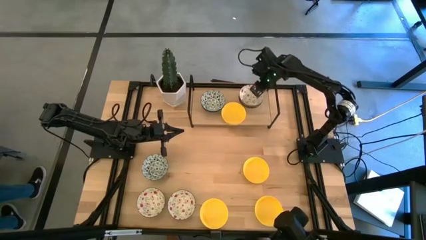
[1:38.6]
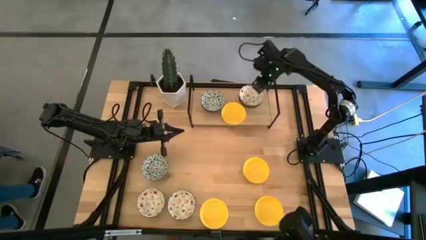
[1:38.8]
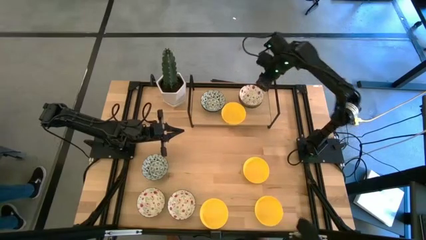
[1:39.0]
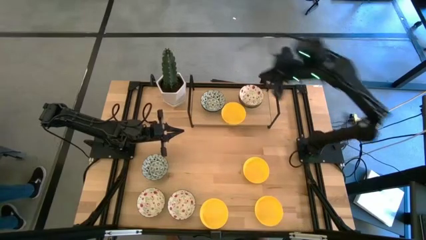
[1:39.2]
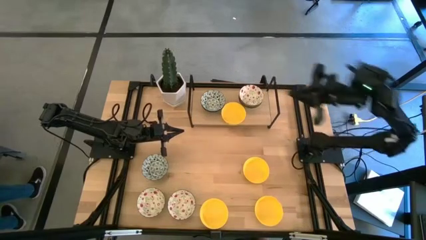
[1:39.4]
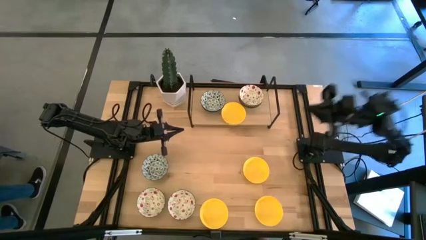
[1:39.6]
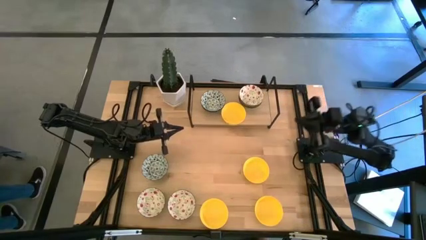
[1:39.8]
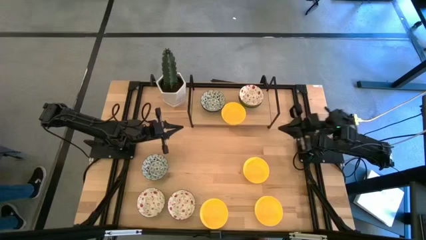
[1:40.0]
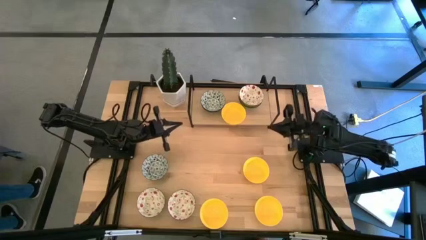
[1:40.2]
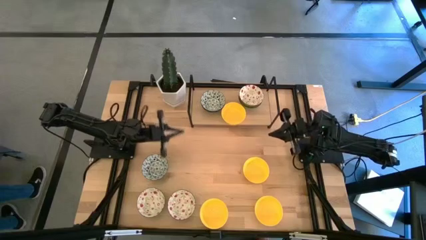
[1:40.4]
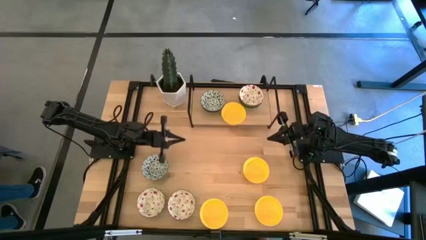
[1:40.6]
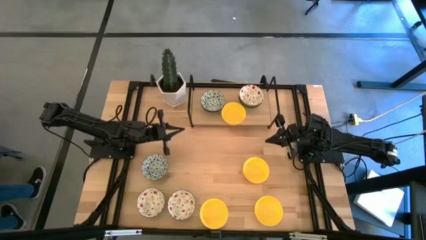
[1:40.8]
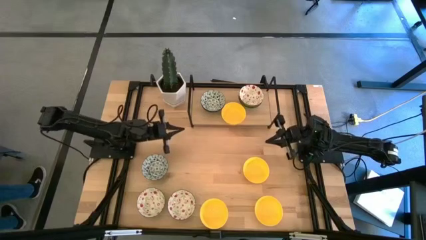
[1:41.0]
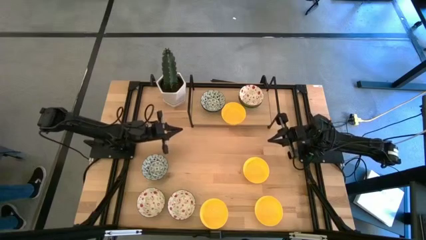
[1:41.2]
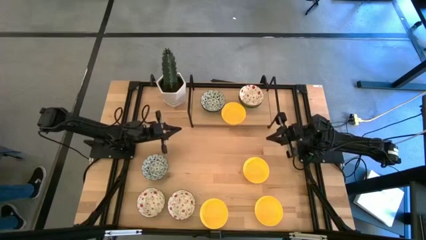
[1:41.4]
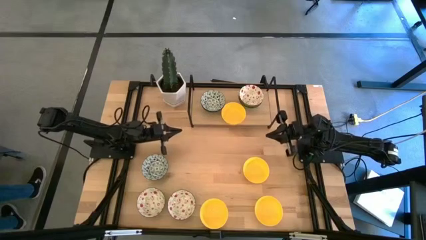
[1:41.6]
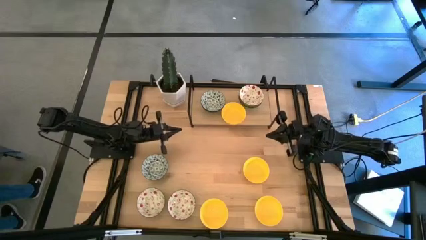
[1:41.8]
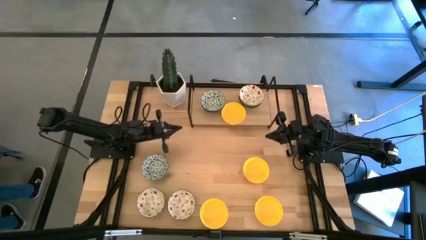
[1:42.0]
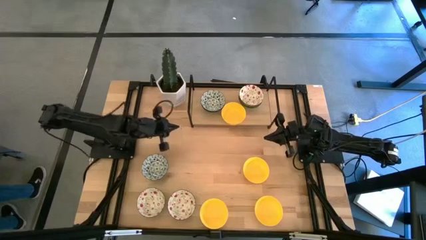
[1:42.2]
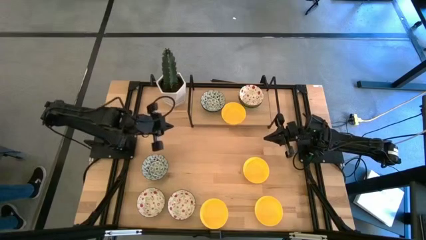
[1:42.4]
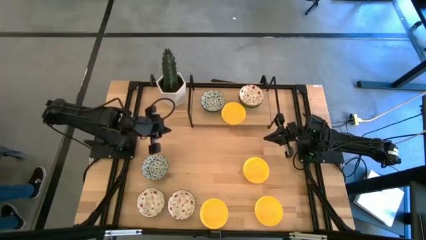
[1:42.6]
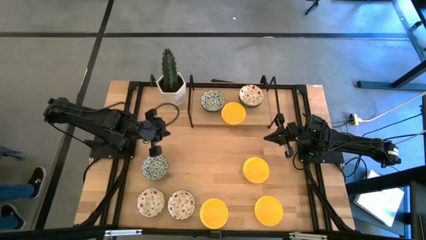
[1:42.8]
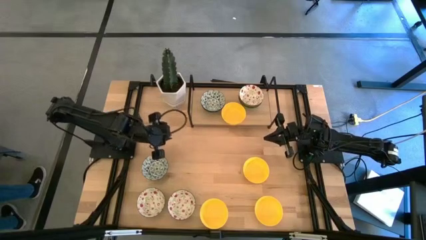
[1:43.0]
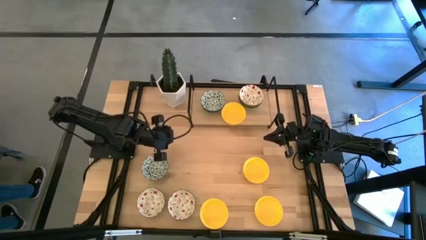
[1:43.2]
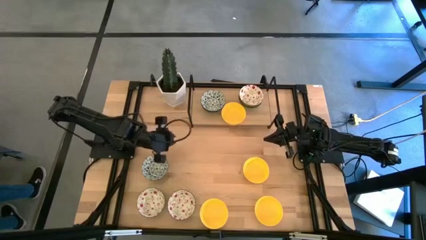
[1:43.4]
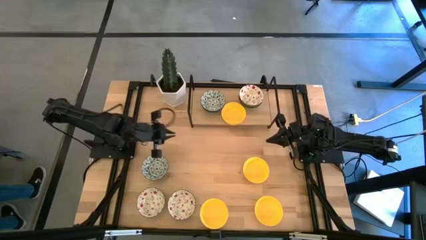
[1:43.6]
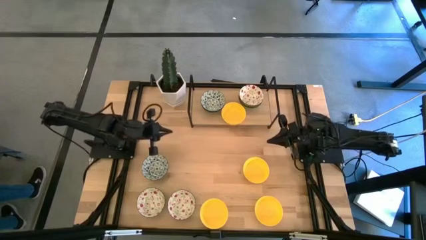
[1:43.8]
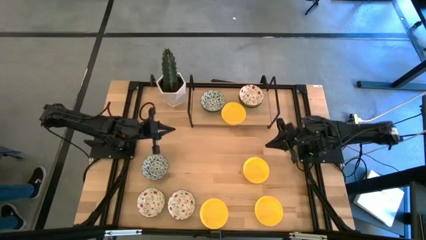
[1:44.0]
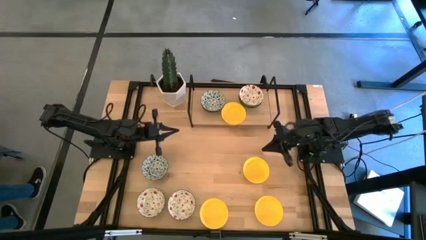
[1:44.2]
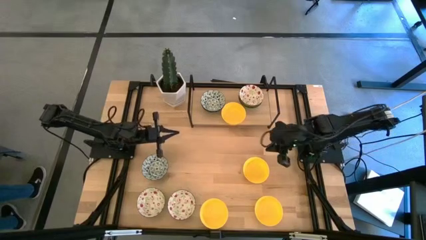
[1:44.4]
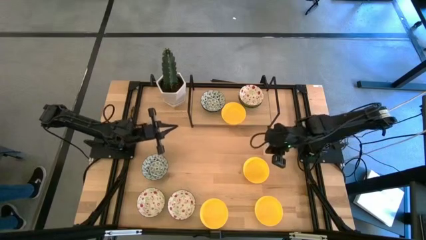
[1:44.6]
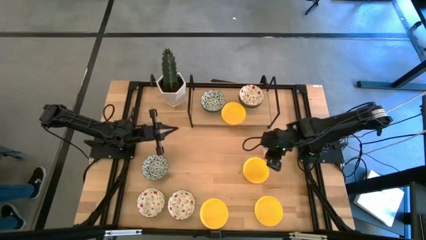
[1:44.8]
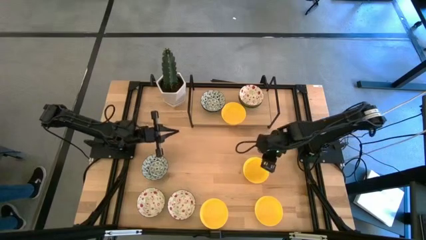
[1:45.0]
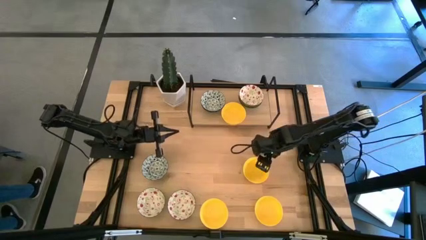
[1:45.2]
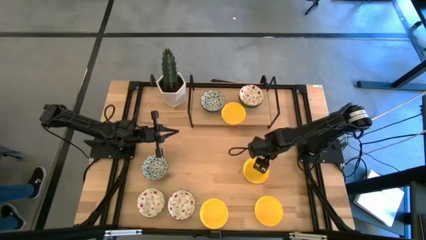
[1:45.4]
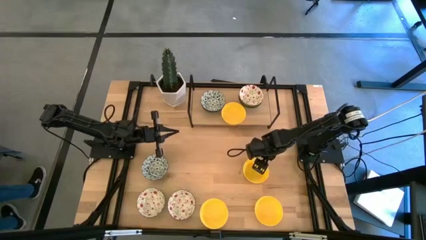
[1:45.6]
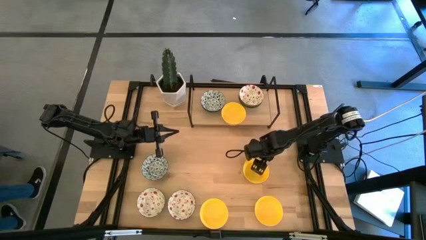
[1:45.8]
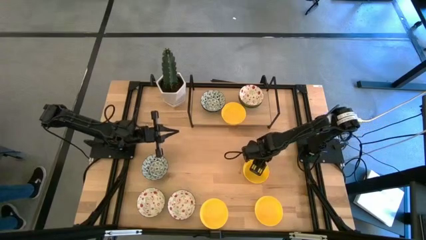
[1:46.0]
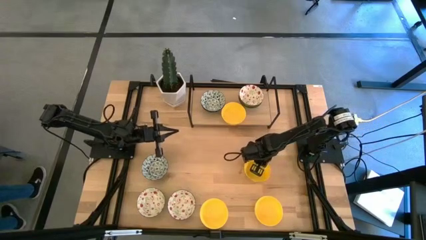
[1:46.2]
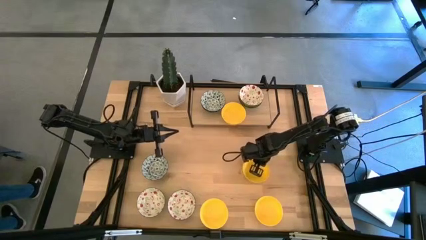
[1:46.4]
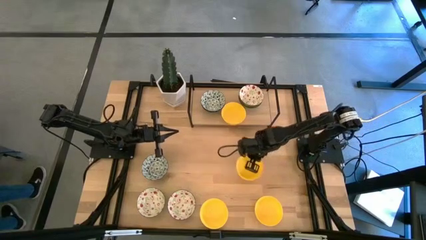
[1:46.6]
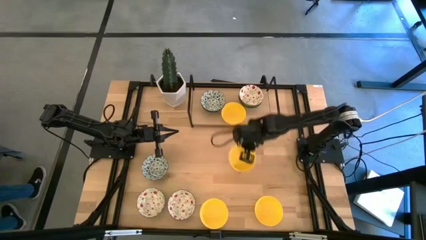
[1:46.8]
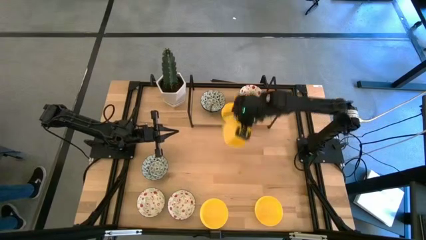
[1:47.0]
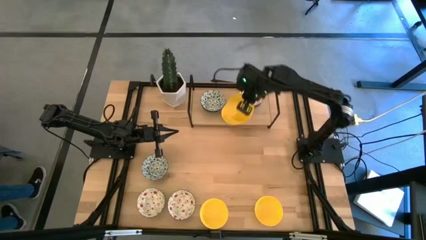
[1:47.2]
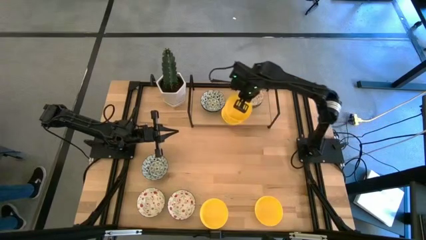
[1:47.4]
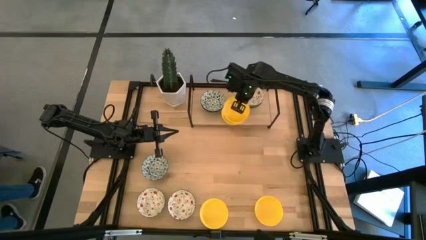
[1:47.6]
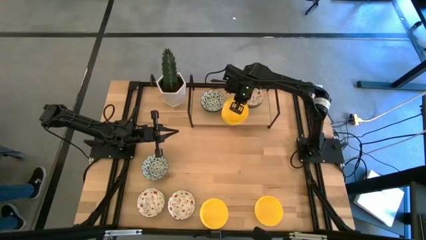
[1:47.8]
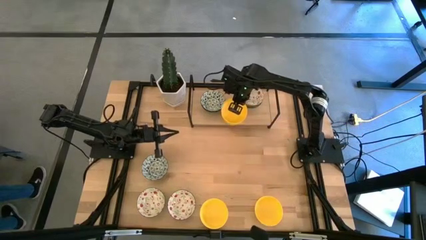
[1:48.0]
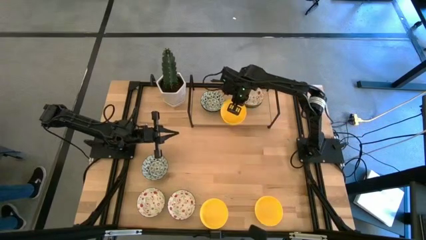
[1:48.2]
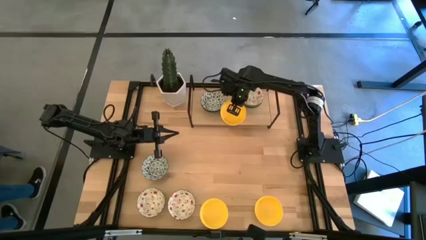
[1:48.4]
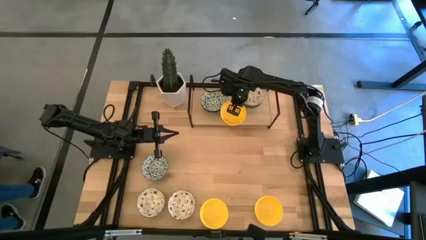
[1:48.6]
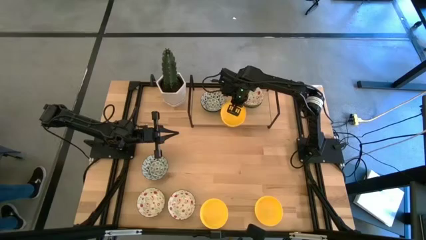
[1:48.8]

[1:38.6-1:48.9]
Task: Pick & Place Mini bowls
Stack the yellow bowl on top of the yellow bowl on the shelf

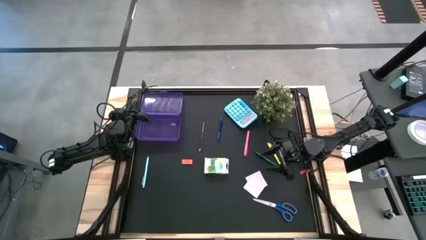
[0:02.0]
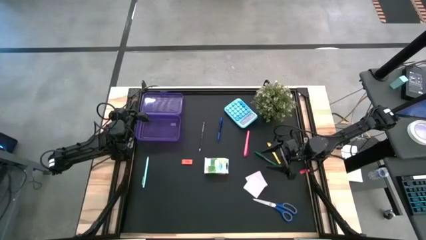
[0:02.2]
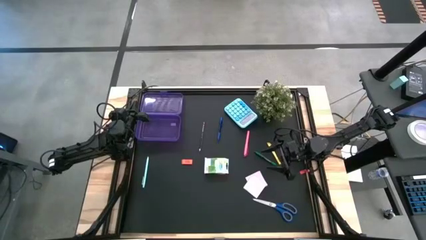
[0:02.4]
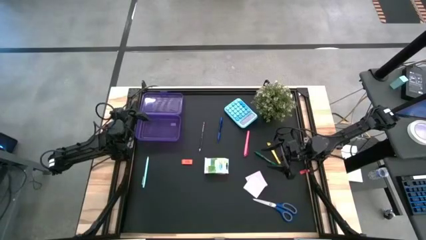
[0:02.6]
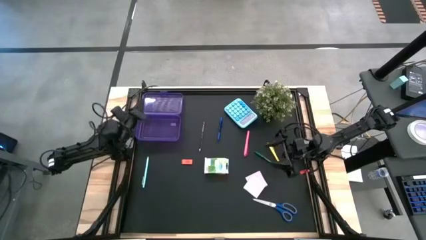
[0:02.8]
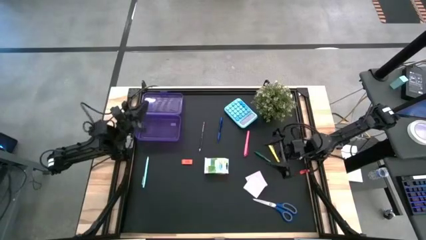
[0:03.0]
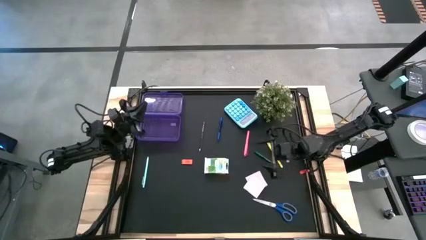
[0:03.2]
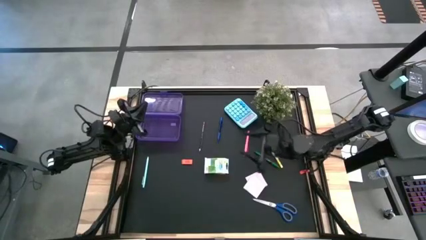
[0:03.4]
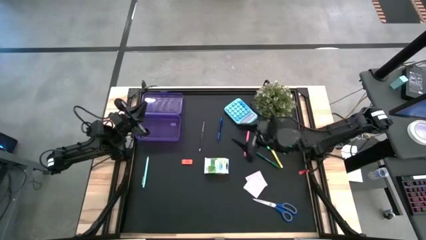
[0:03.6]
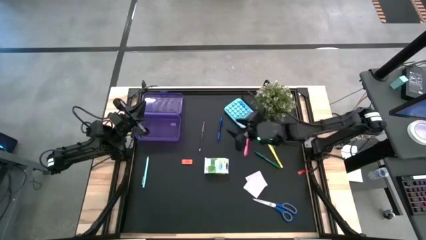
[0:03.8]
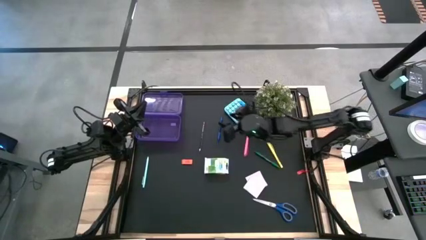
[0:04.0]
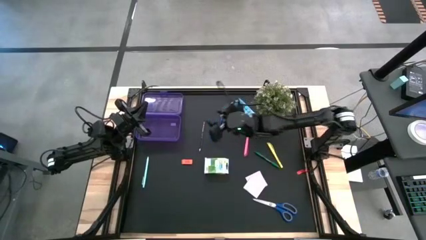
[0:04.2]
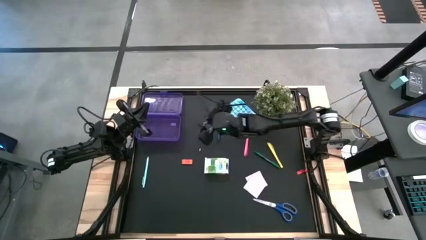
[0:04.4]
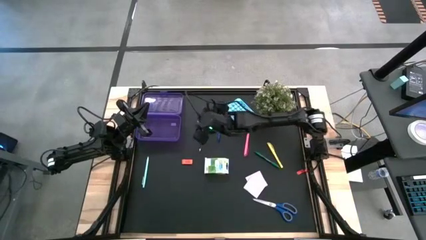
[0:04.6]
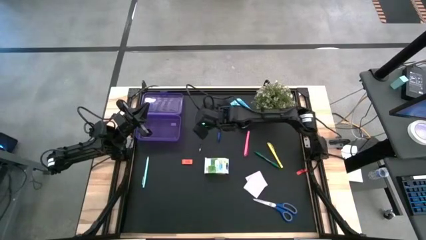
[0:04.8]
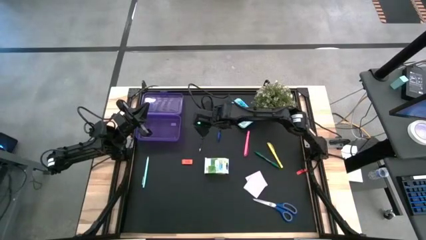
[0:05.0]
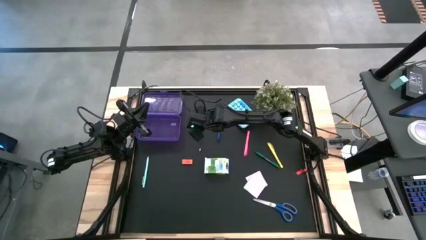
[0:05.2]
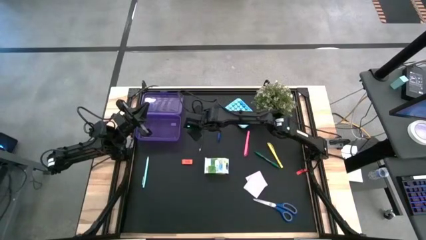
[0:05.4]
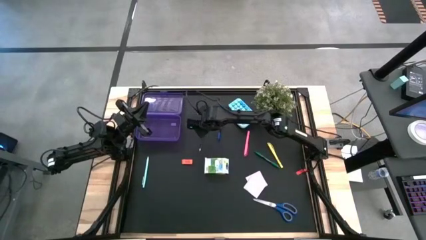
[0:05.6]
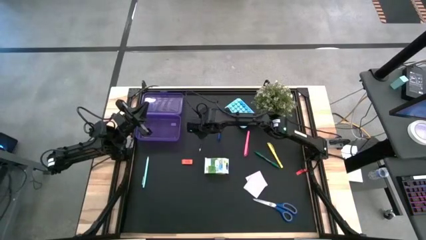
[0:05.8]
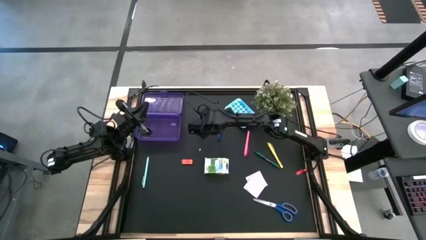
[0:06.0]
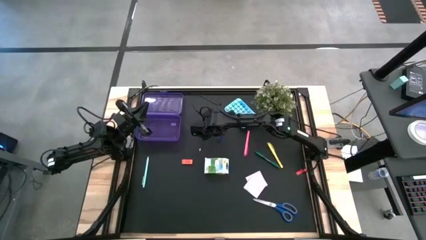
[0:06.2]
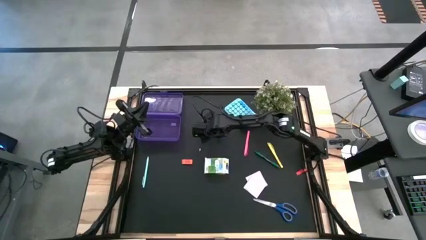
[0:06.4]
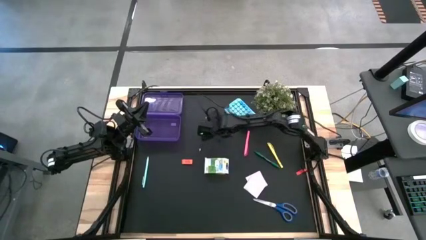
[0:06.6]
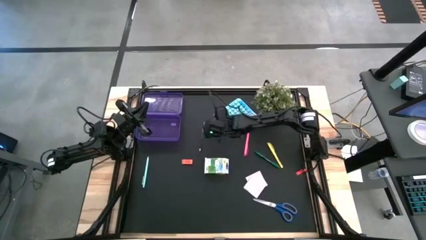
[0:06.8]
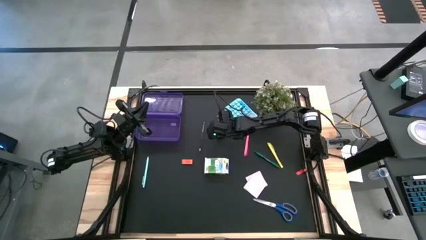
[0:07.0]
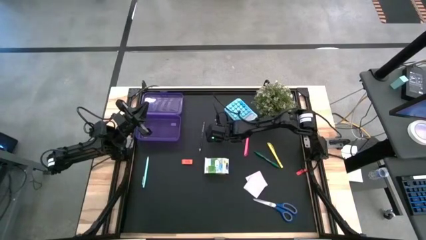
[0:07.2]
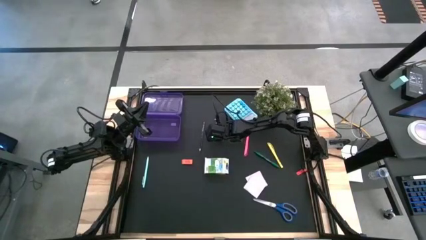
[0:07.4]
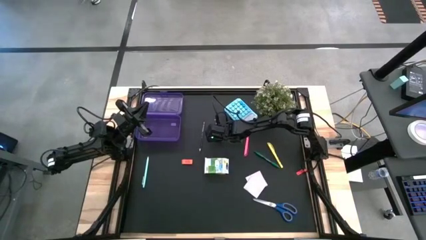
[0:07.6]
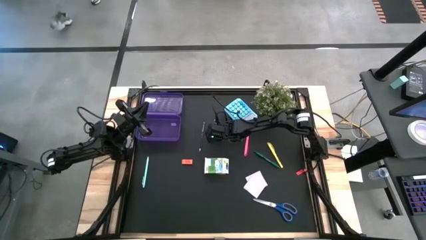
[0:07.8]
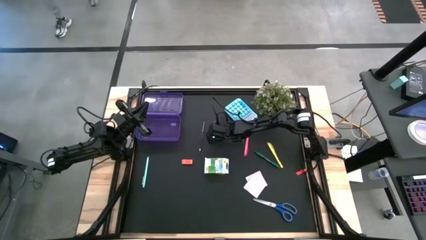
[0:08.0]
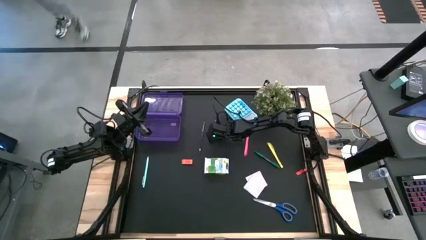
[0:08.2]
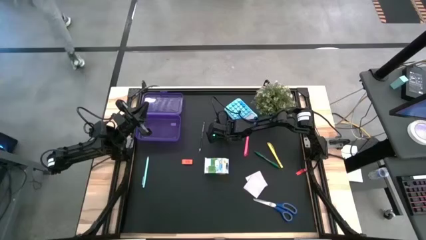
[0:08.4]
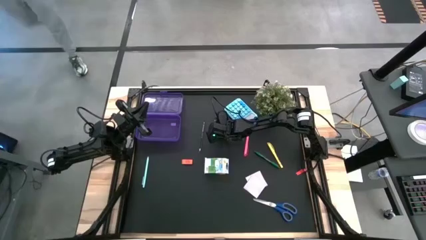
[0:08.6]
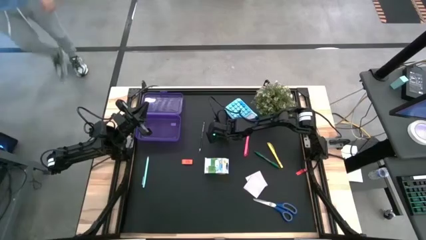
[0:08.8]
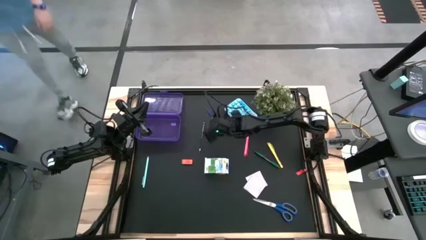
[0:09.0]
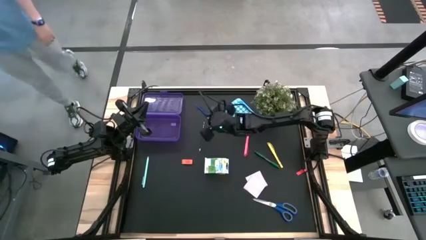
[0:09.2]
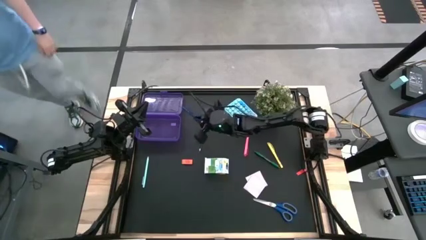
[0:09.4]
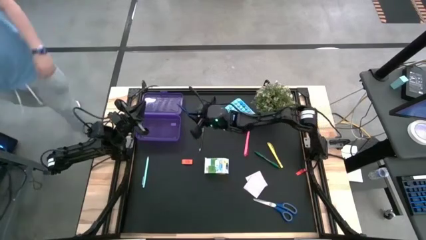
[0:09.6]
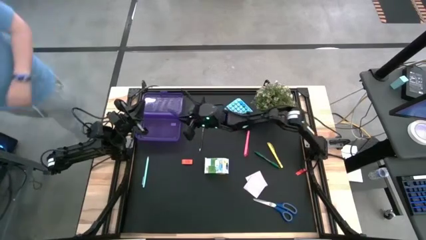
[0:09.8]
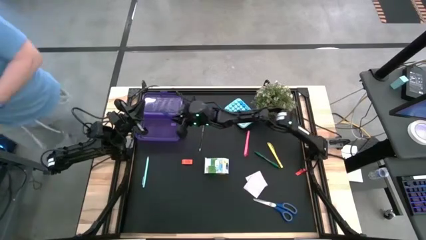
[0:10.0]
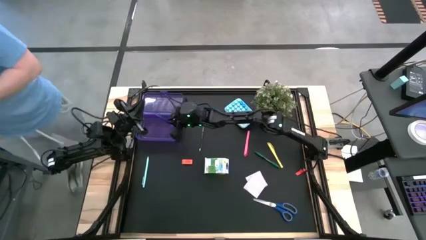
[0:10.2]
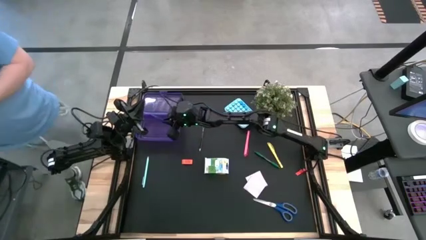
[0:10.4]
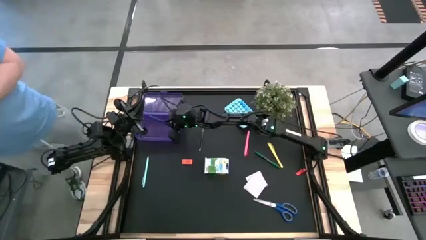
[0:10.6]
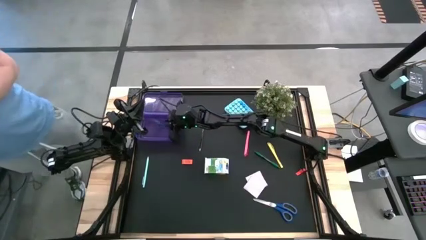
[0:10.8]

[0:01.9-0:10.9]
Task: Pack school essentials
Put the blue pen into the purple supply box
